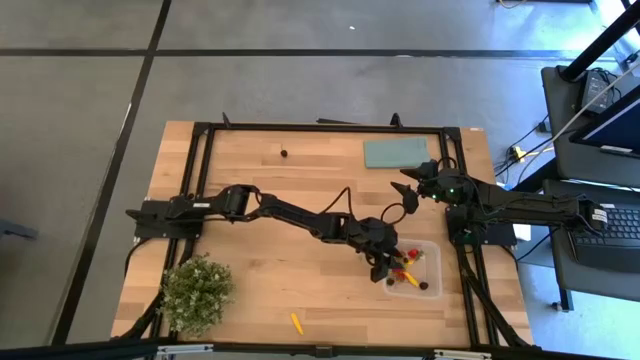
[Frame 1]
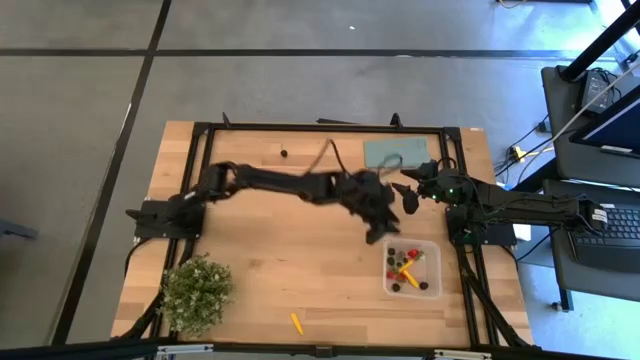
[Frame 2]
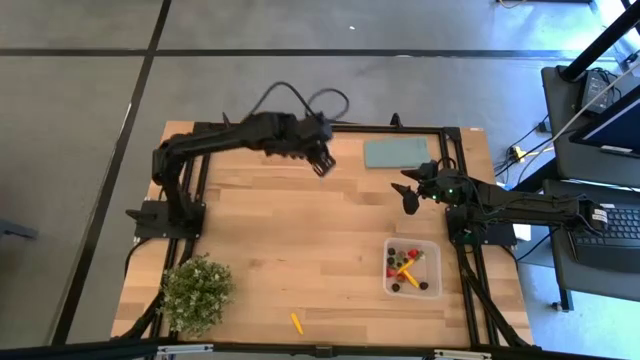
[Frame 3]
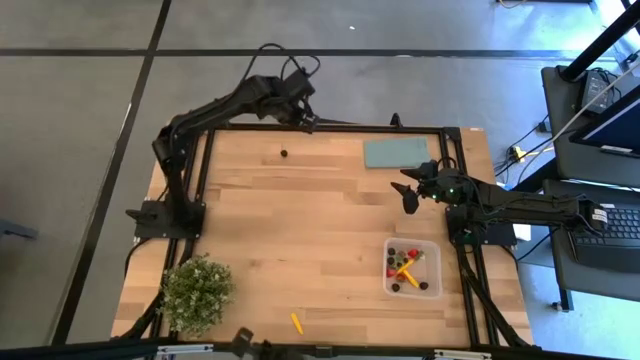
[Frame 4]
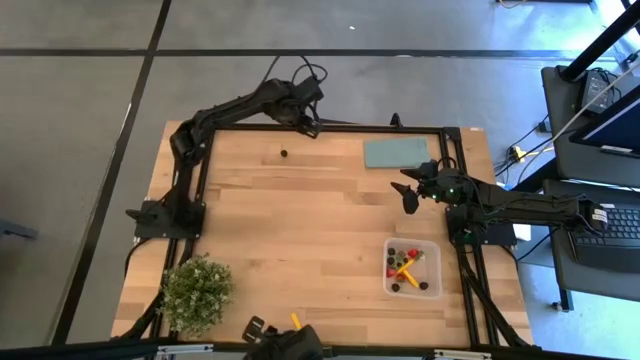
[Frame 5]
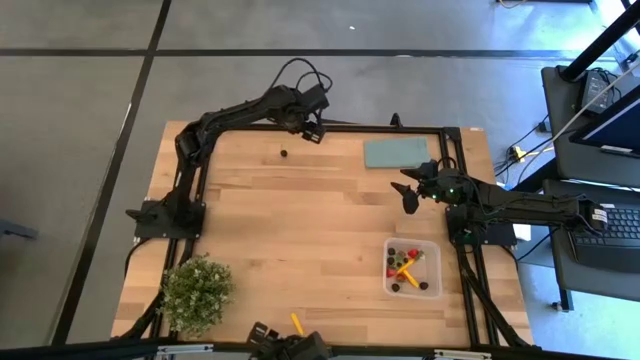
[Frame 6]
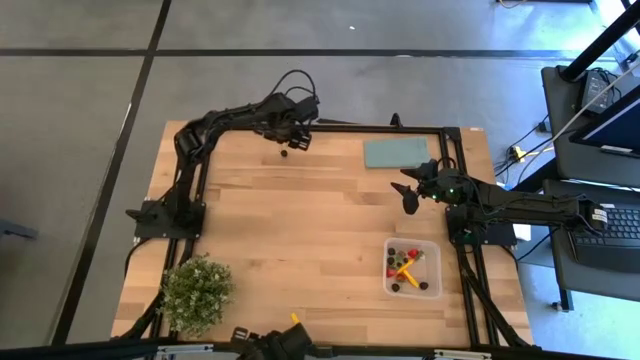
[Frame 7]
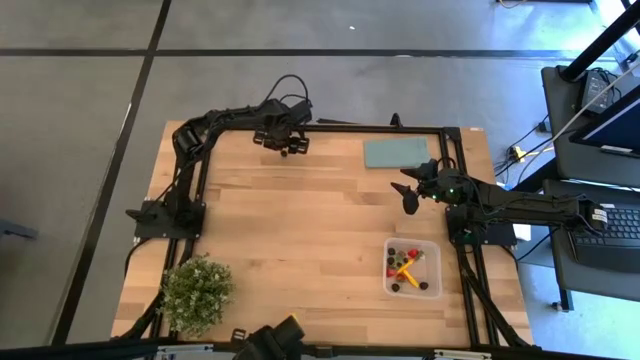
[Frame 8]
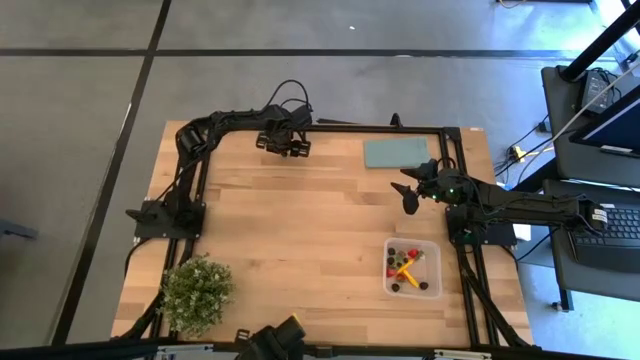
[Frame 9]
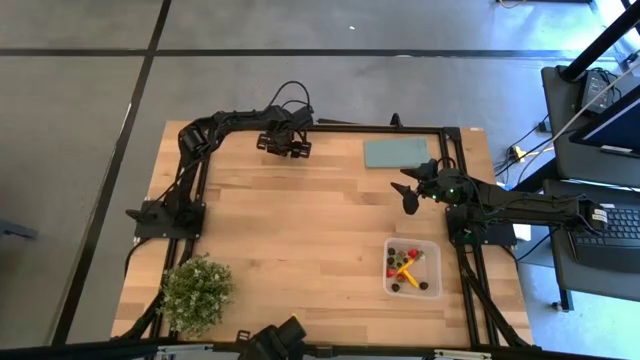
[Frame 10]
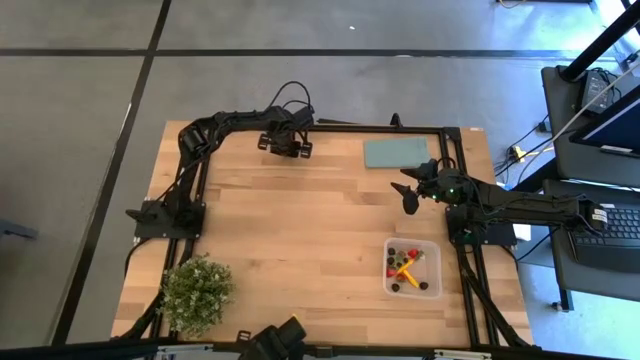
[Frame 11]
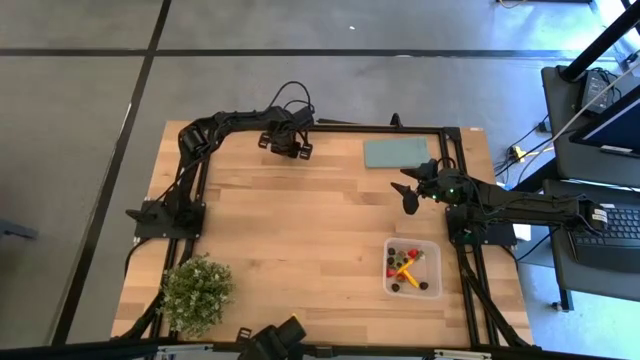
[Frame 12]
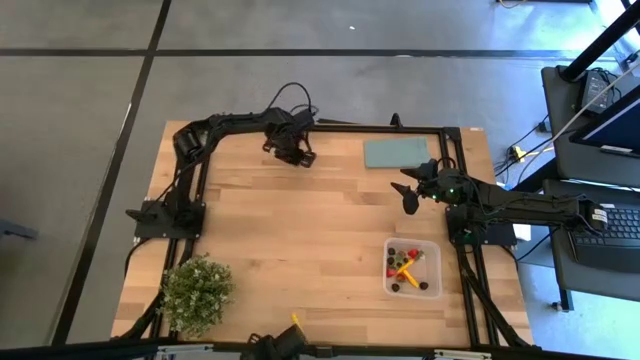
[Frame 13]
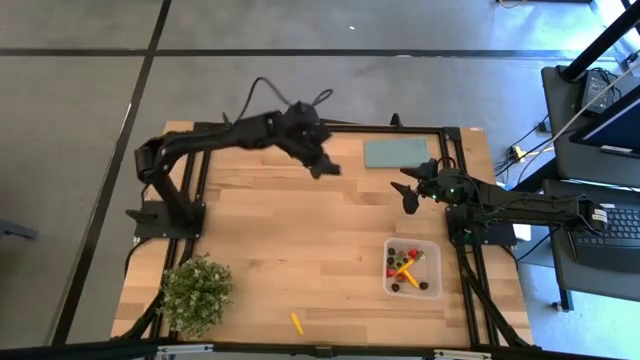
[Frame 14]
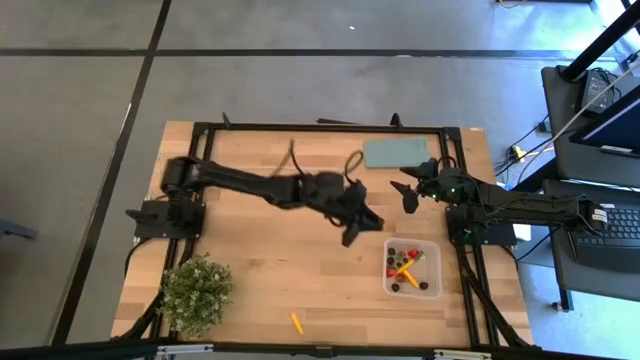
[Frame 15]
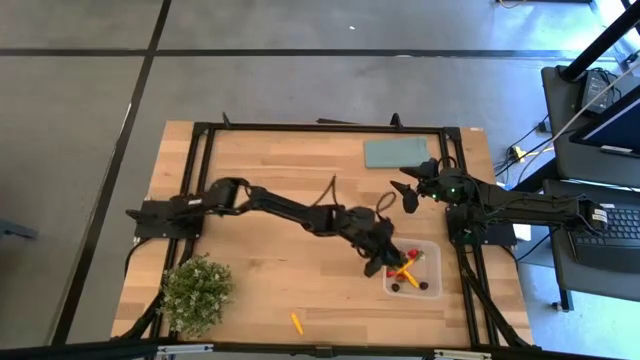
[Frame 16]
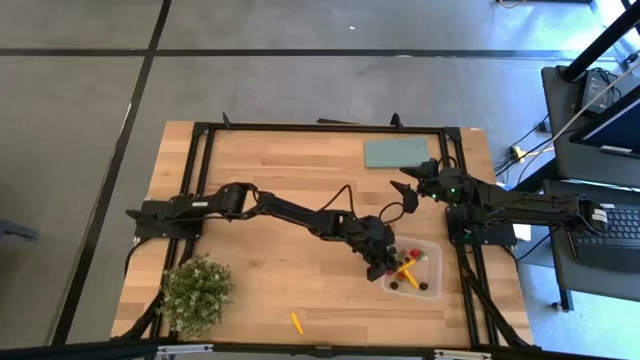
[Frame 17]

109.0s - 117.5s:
Task: Pick and placing Produce into tupperware
Put the black cherry into the container

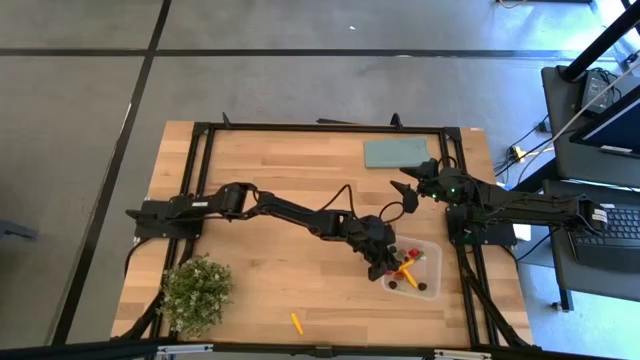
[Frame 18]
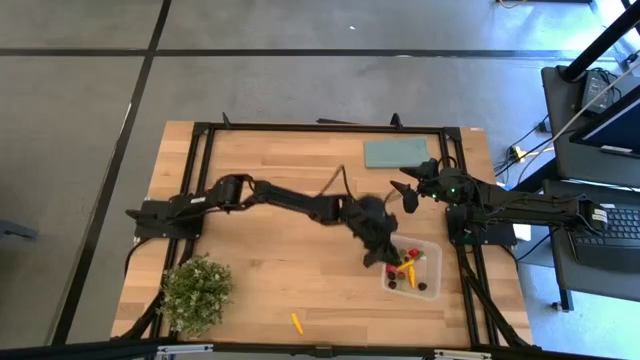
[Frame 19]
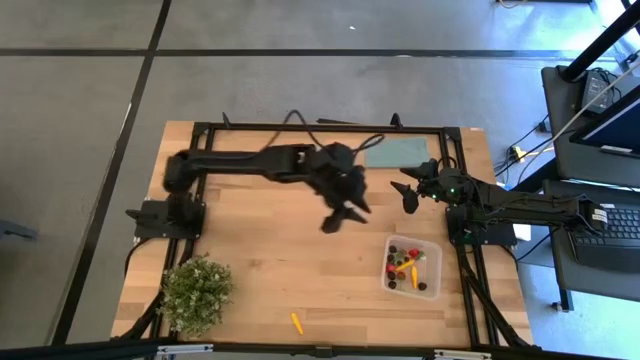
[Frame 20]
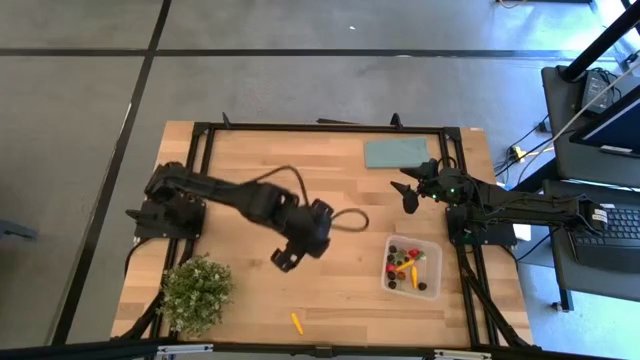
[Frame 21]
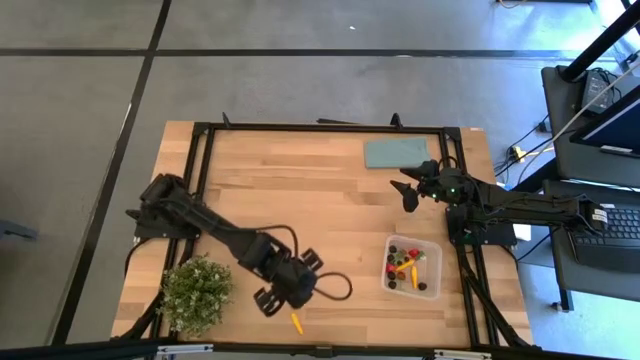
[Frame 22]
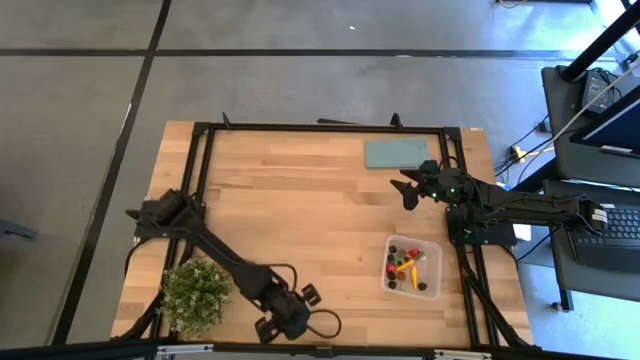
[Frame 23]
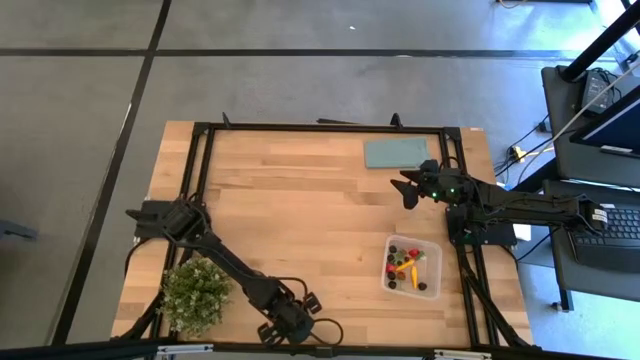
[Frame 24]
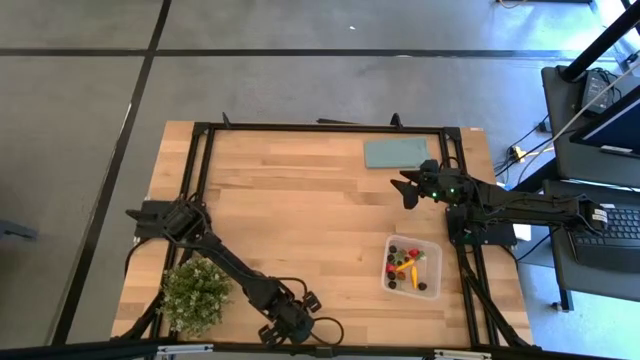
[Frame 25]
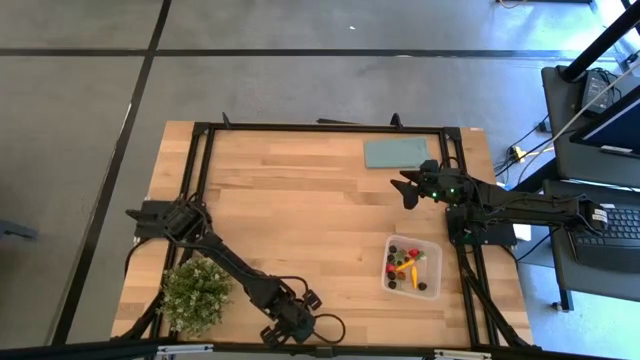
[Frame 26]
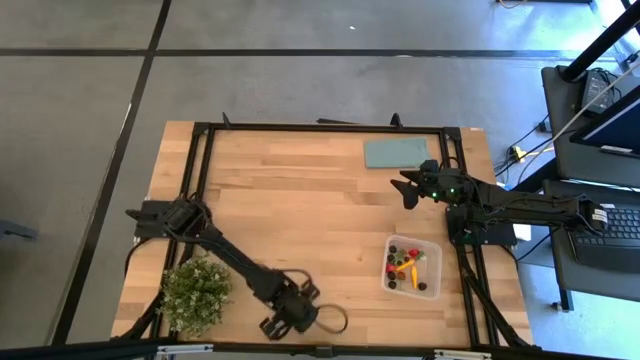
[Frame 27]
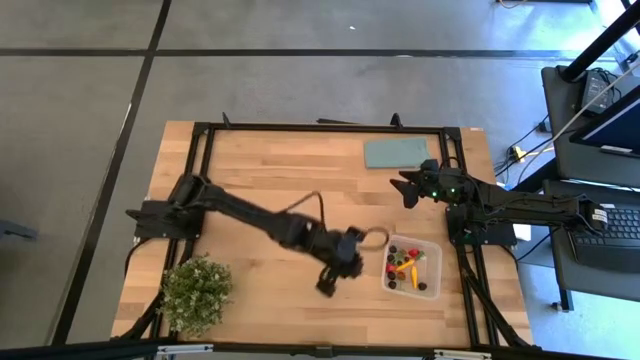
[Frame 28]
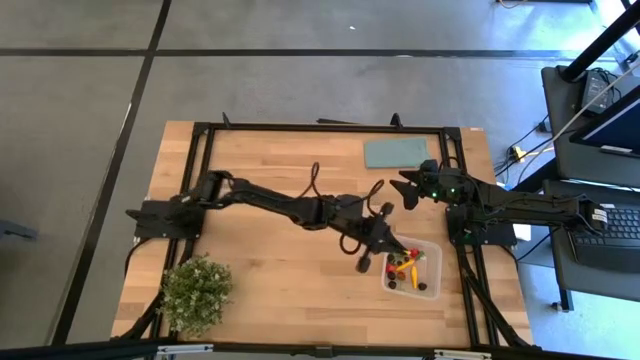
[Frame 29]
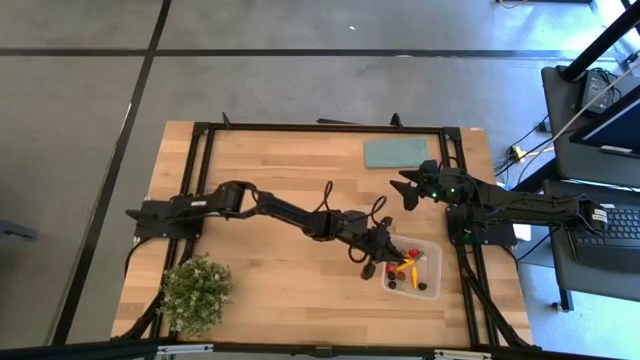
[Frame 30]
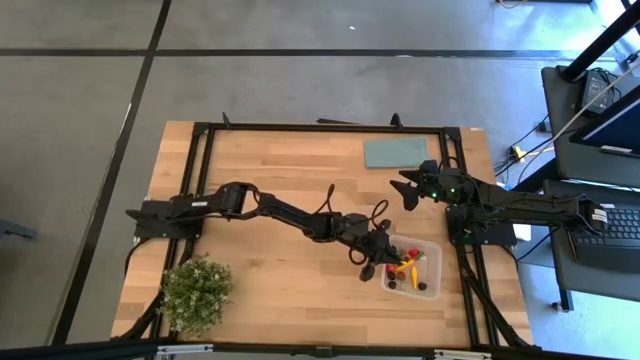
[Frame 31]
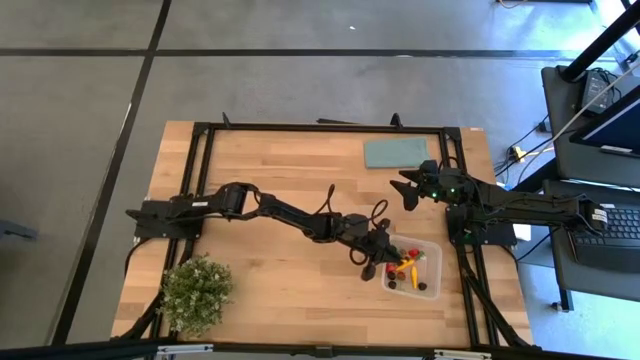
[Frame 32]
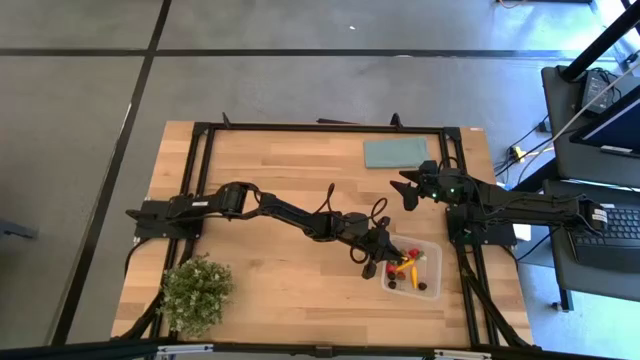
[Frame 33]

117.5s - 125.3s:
Put the corn into the container

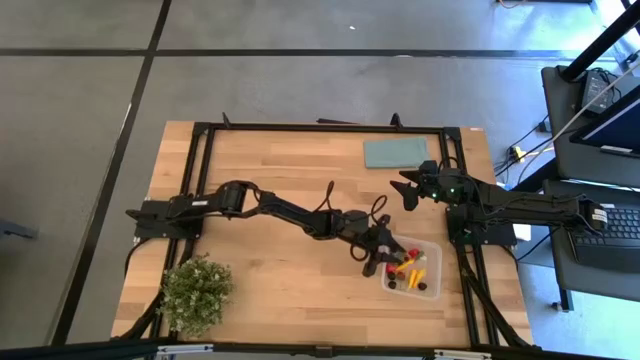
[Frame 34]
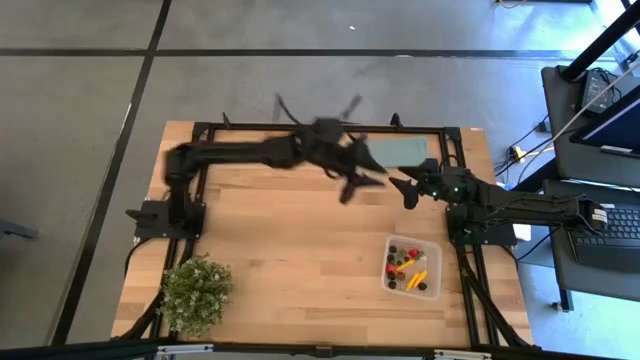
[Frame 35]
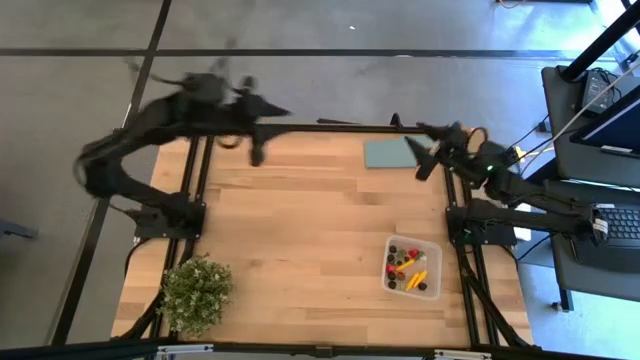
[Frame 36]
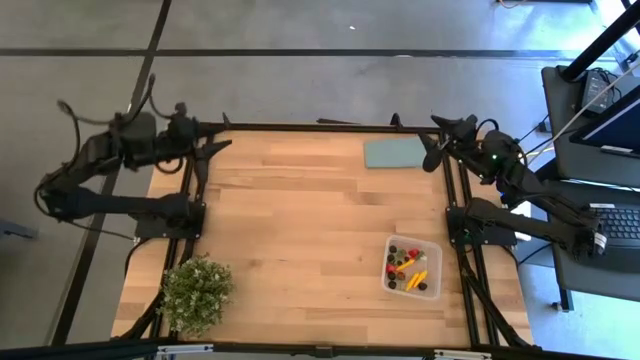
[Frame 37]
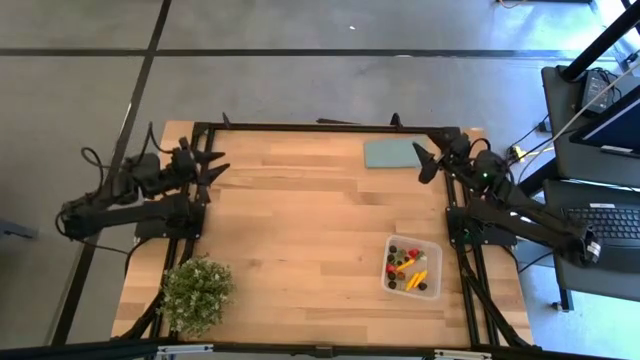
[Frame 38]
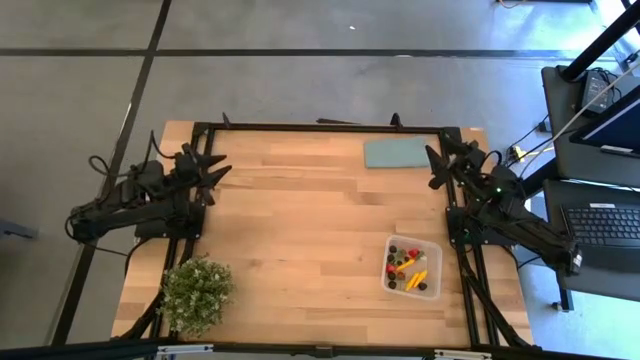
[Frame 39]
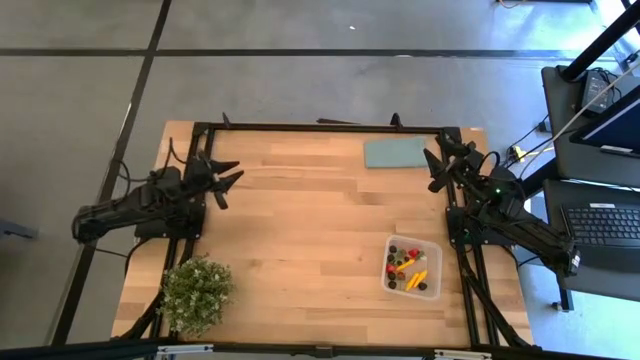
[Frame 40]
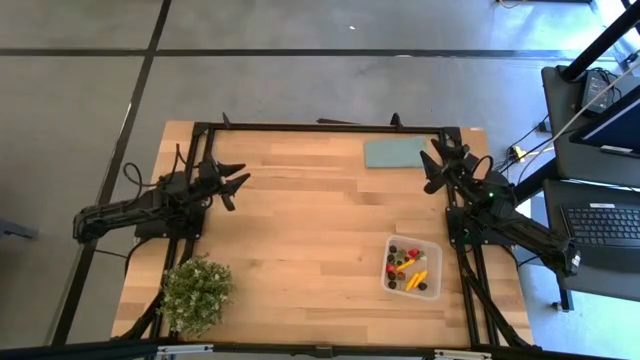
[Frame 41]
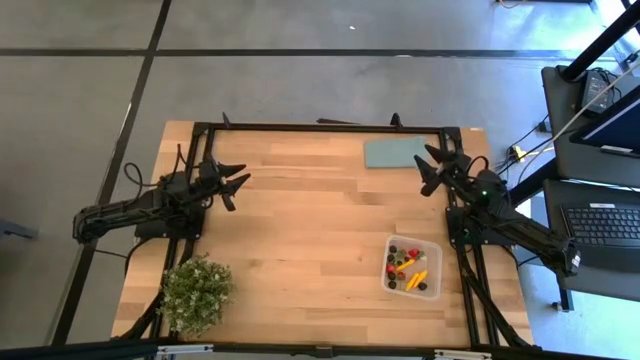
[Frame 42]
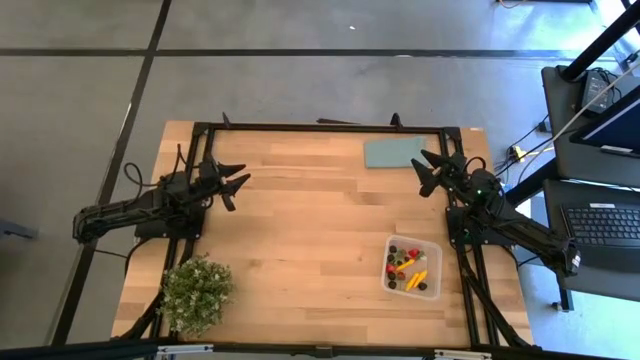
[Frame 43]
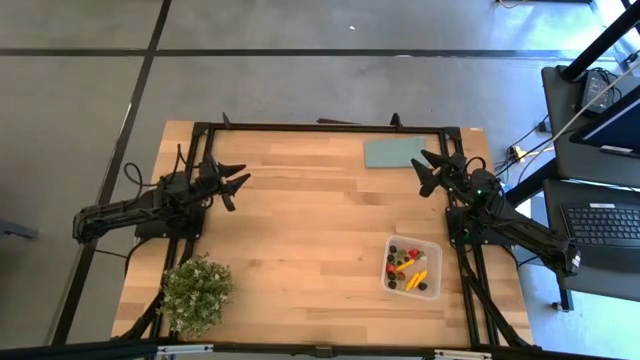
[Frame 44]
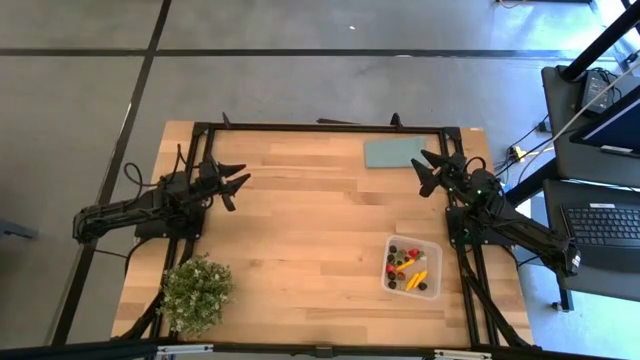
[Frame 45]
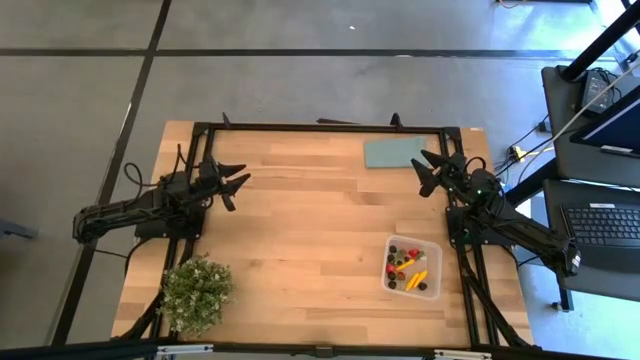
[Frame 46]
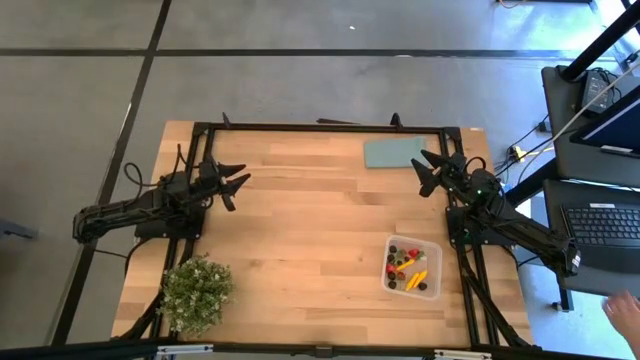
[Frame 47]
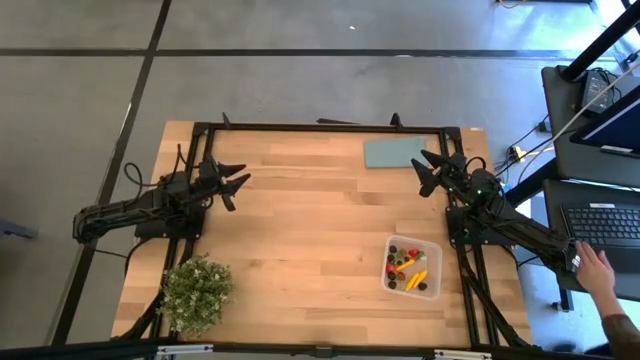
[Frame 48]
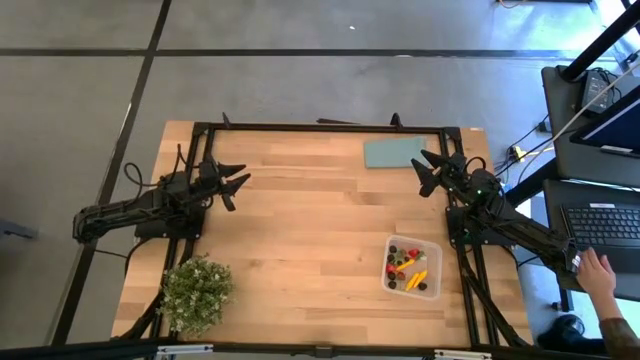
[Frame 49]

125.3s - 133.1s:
Return to Home Position
